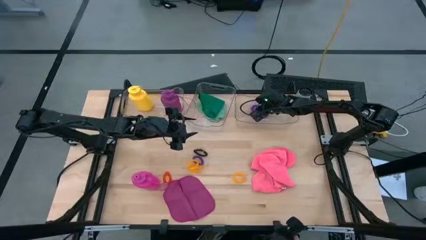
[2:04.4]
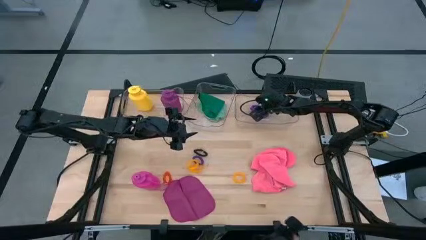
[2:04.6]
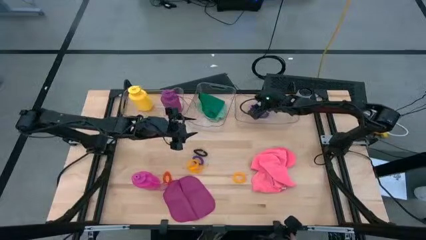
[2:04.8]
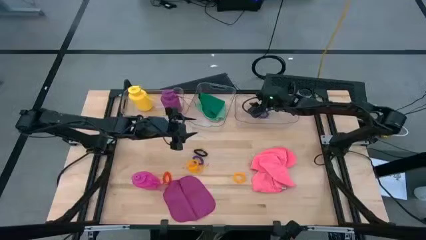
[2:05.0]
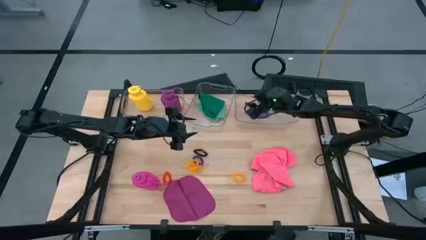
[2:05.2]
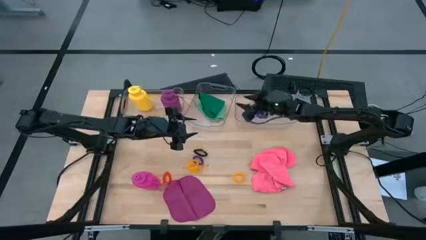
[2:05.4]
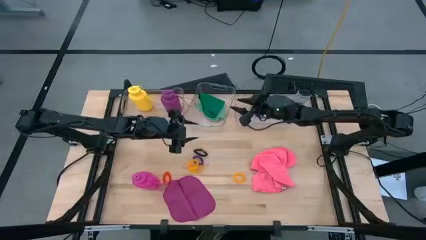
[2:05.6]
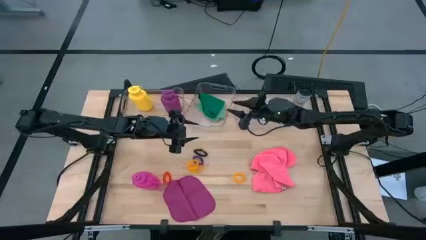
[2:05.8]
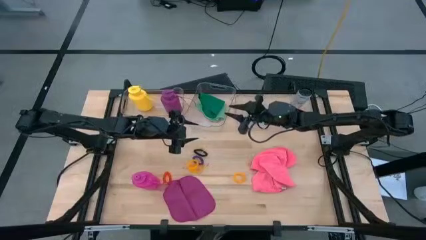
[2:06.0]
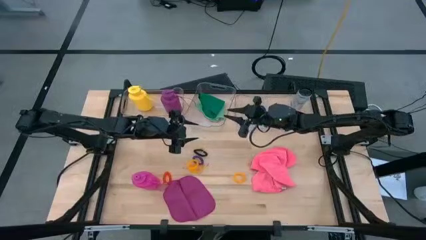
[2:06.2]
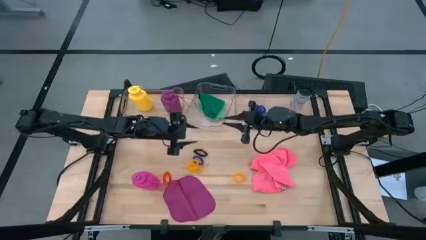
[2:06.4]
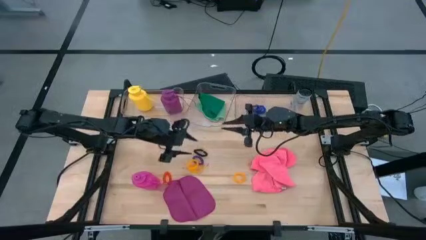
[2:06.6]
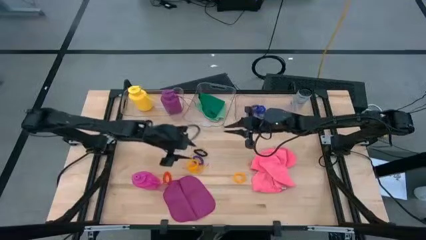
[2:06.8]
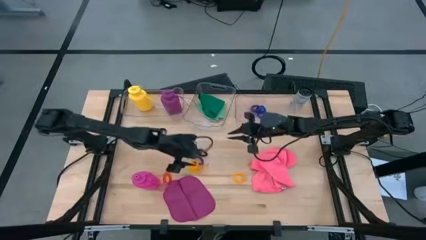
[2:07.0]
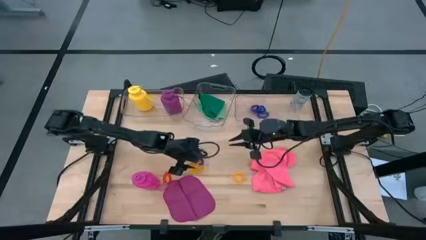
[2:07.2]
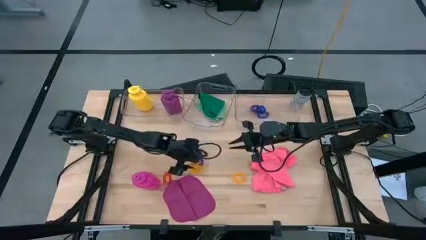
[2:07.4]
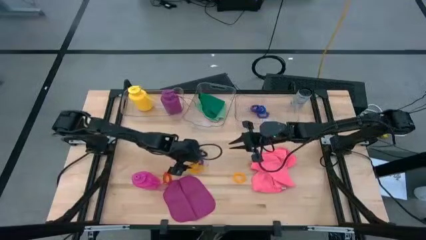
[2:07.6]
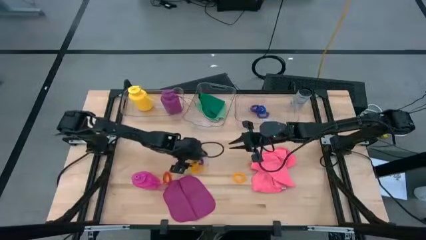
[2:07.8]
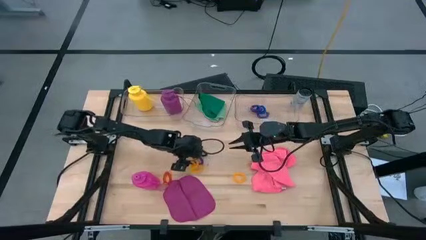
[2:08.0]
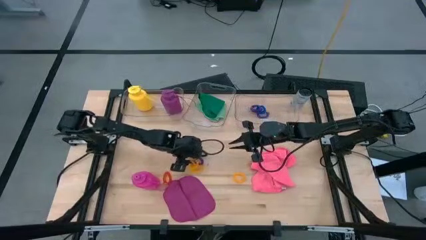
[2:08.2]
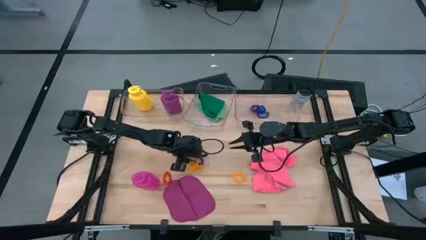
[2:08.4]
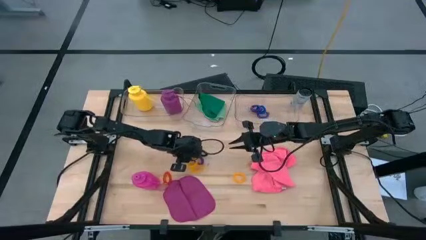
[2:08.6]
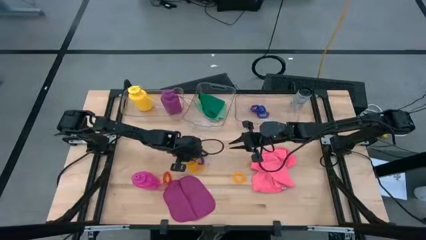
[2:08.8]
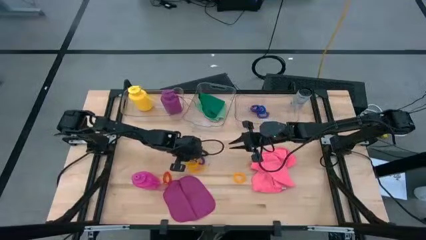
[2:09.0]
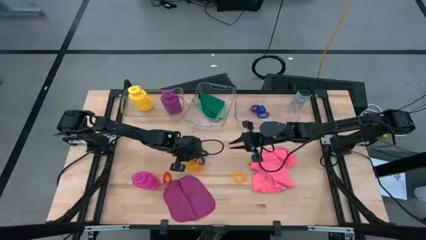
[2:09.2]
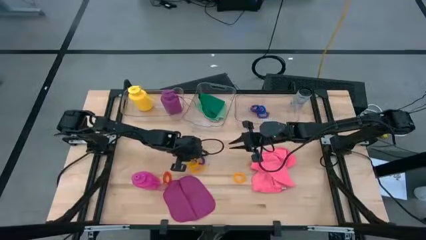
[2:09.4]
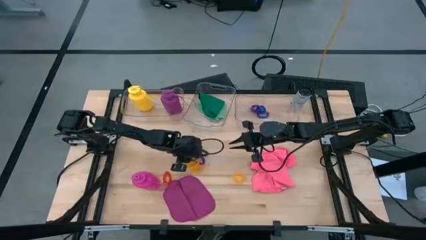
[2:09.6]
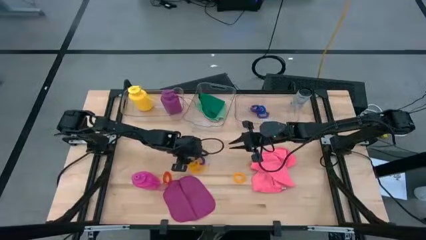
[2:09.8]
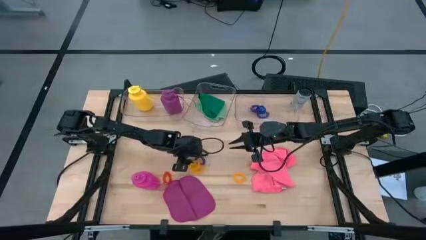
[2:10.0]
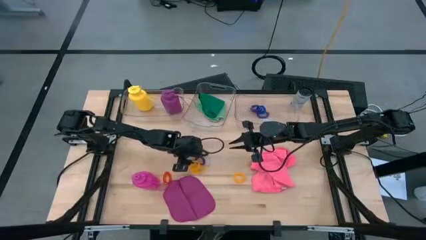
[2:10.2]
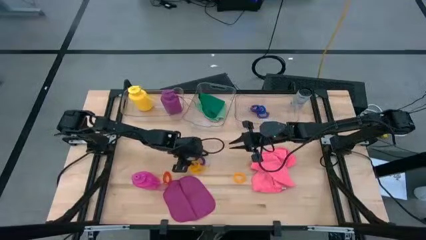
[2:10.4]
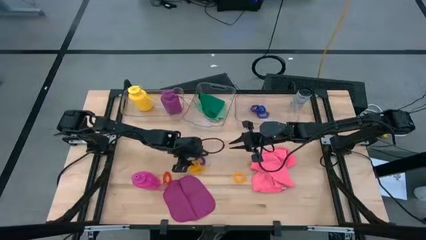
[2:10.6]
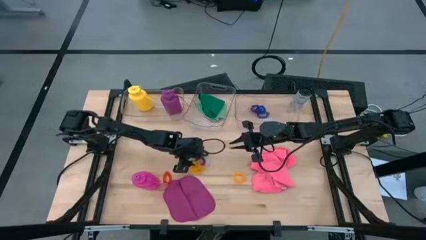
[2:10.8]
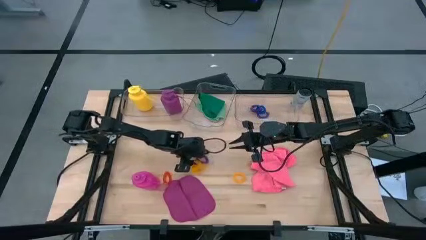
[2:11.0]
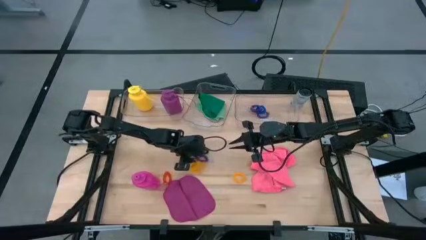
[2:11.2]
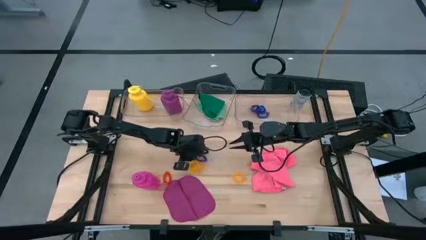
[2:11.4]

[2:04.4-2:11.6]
Task: Pick & Place Sports Items
Put the black spring keychain into the right transparent bin

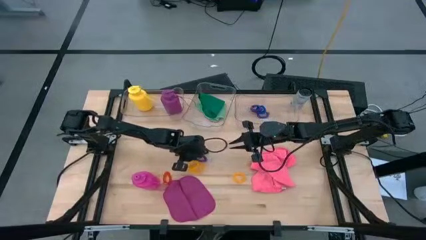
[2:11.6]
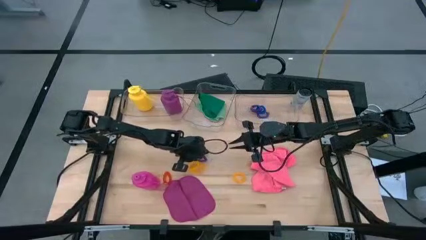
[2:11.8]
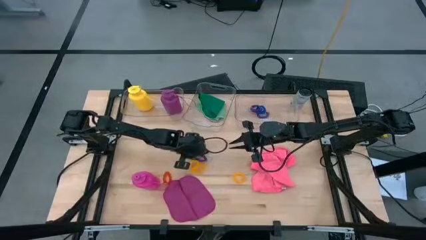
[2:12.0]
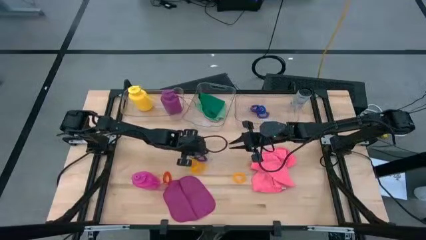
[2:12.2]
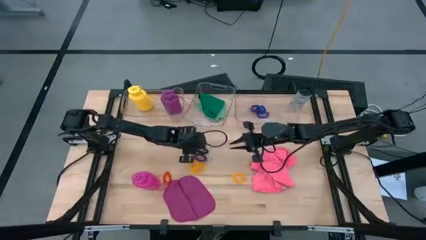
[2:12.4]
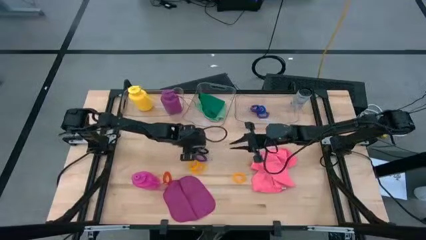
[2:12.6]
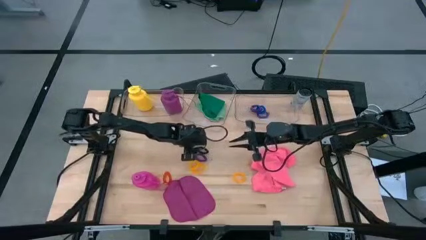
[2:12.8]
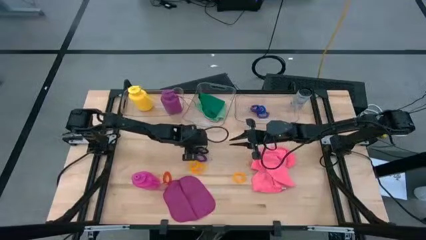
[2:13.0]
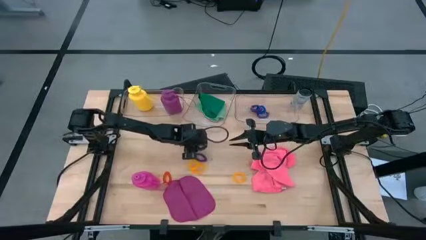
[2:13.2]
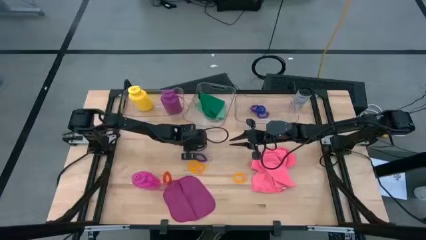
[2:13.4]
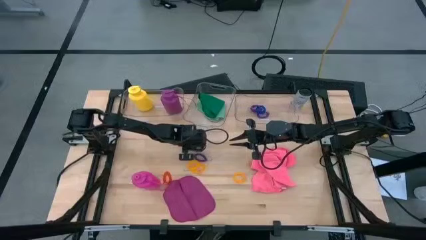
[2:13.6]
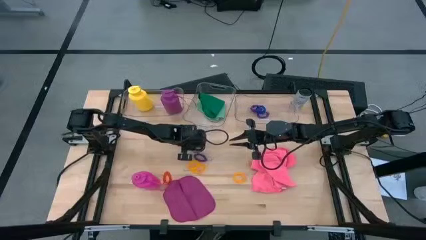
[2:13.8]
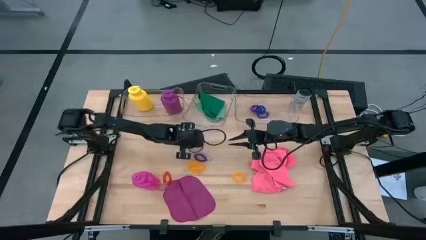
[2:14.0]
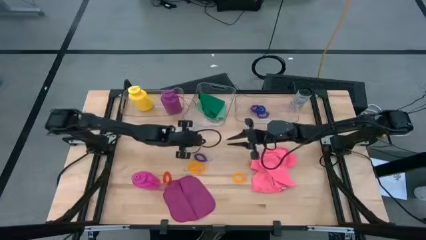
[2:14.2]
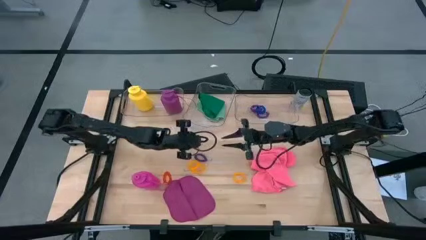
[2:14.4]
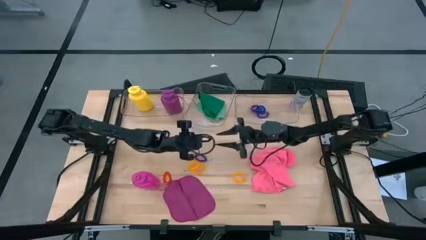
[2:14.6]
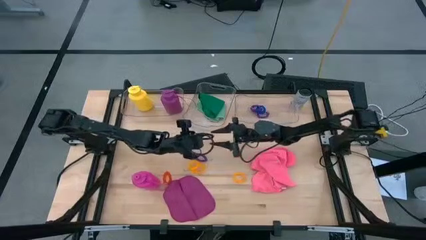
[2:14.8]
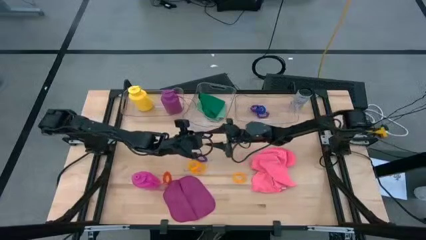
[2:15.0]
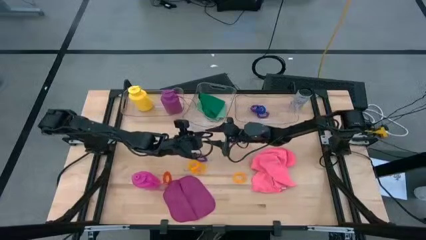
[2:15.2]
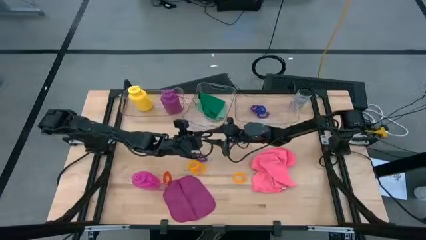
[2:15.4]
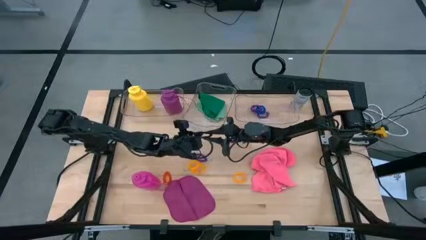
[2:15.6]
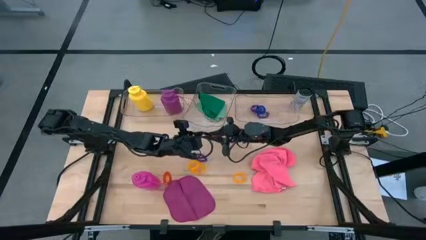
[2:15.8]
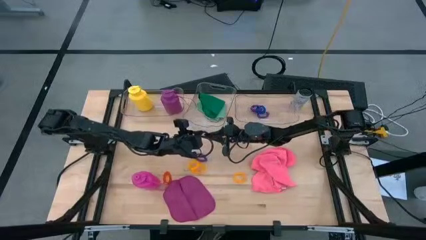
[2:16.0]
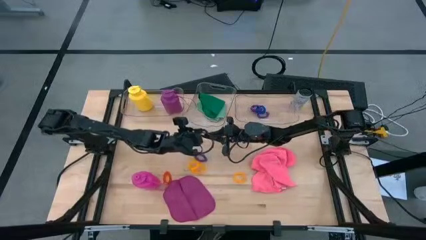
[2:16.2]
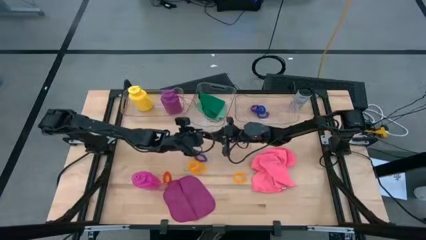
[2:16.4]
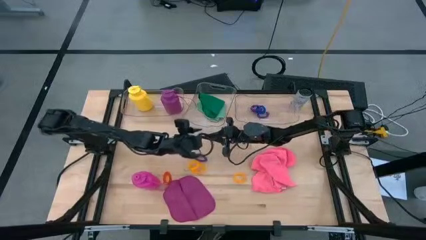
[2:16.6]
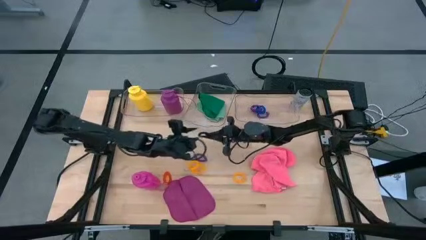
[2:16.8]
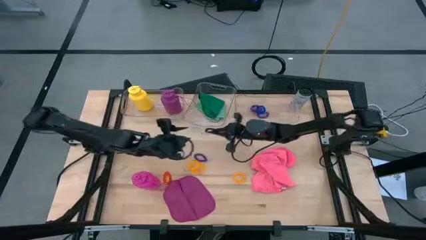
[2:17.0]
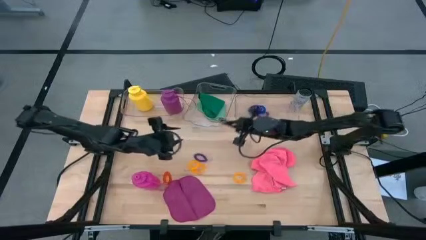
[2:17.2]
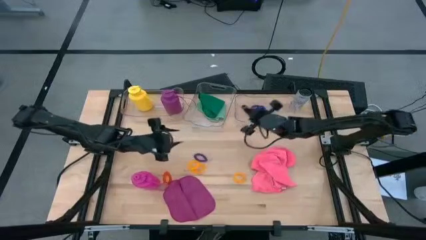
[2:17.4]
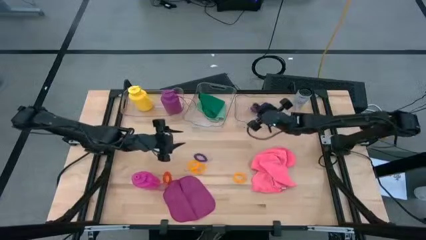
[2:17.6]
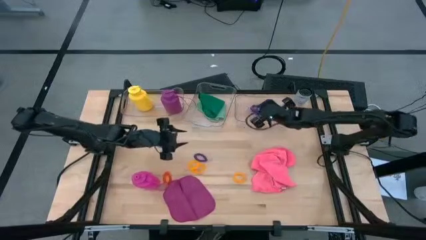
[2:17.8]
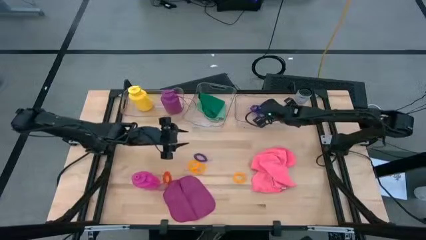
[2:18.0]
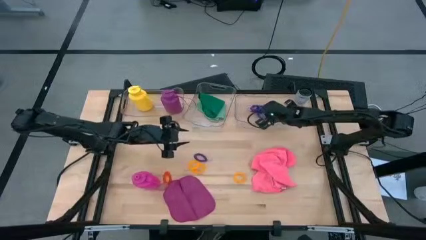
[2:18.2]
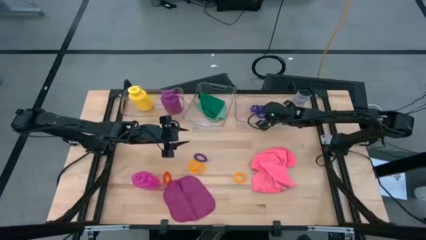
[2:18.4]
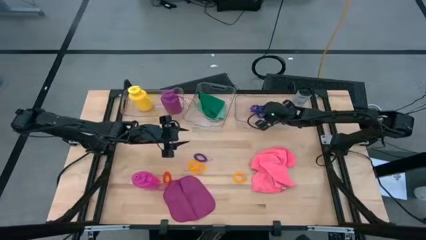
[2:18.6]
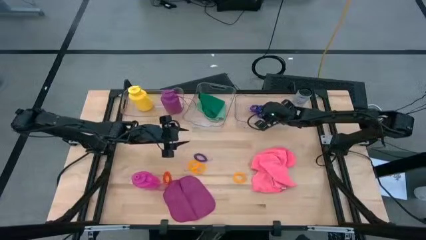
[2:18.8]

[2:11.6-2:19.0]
Put the black spring keychain into the right transparent bin

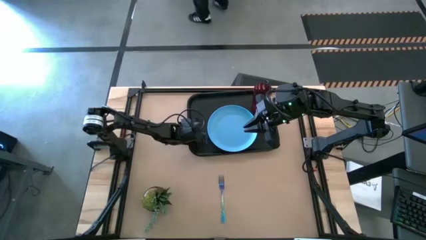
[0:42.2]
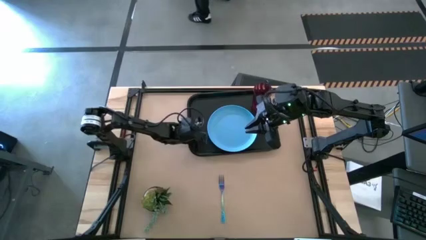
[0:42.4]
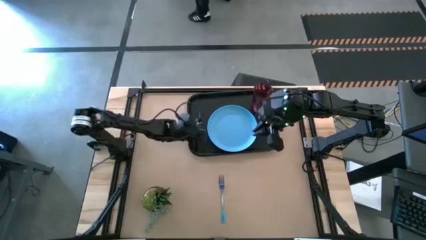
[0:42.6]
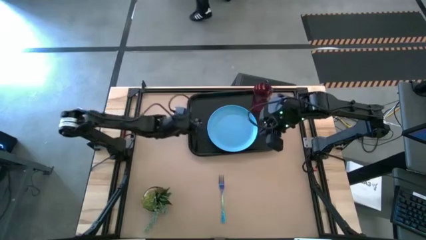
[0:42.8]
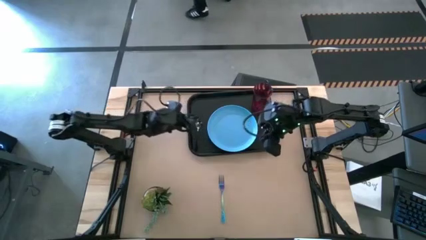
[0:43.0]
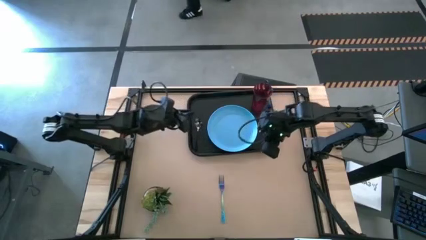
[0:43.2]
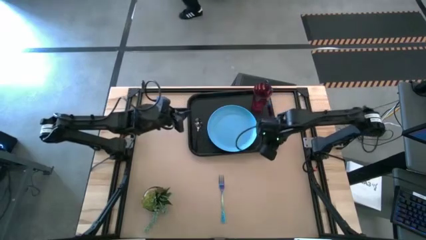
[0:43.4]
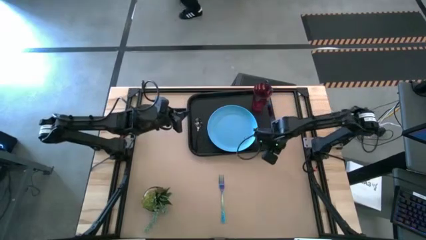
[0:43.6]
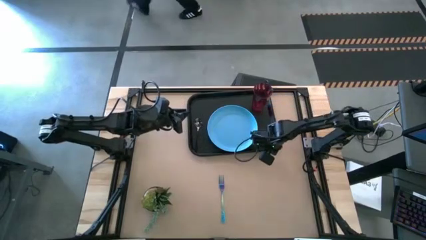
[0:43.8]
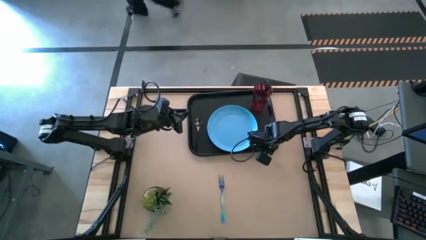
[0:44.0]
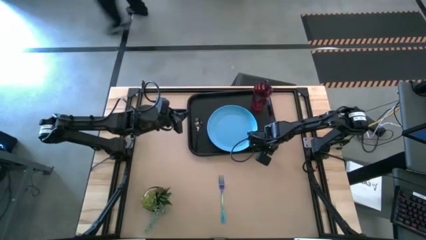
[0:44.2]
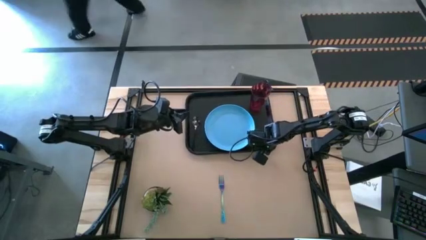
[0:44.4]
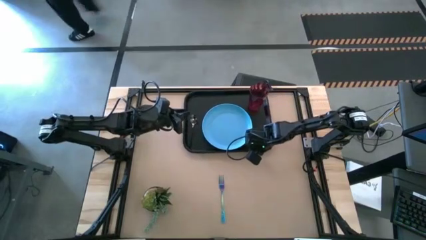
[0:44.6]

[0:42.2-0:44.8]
Task: Pick and place plate/cup/fork/spoon on tray
Adjust the black tray
